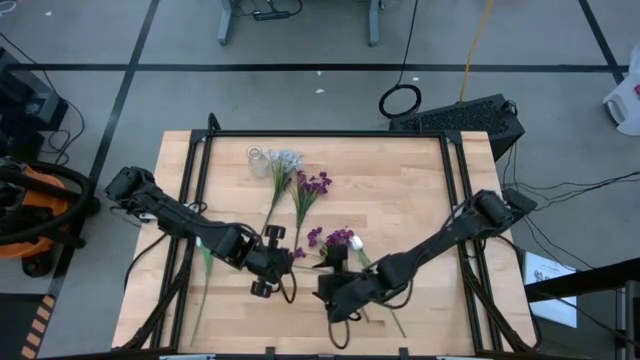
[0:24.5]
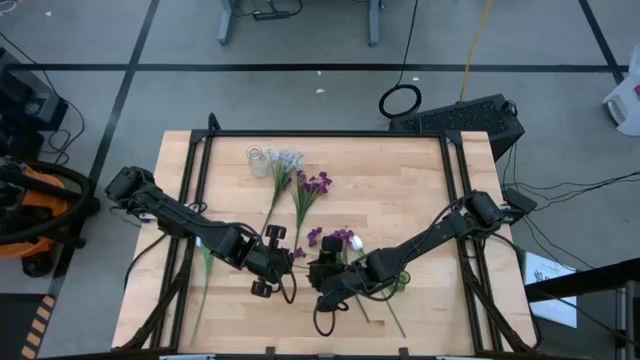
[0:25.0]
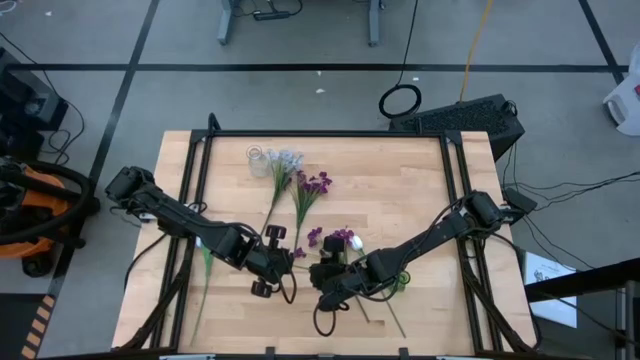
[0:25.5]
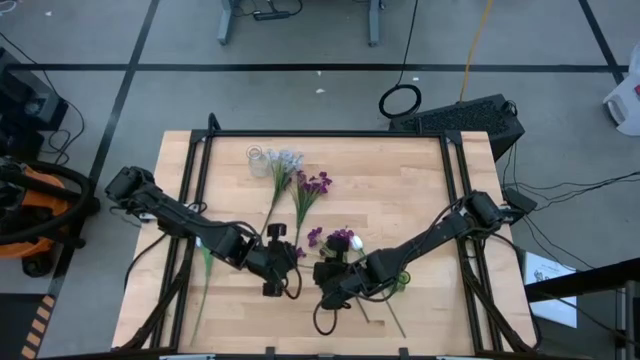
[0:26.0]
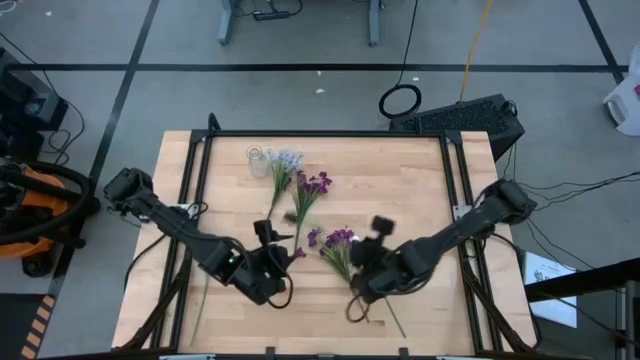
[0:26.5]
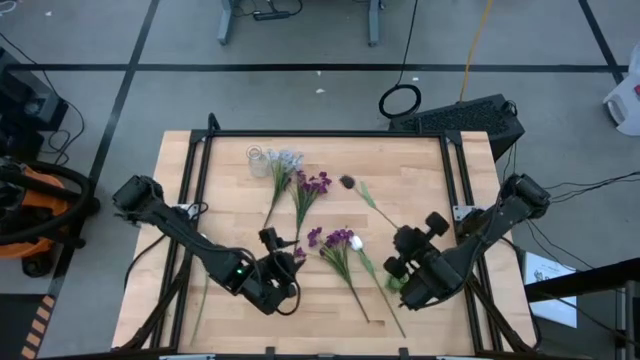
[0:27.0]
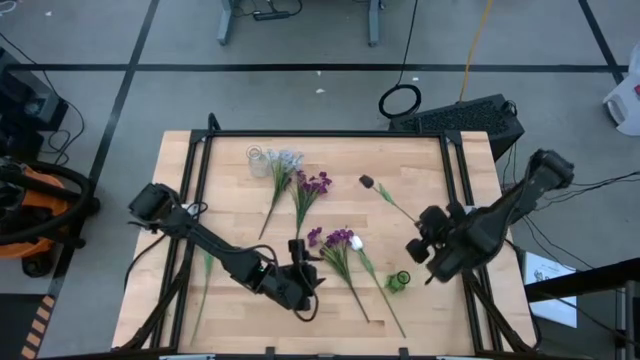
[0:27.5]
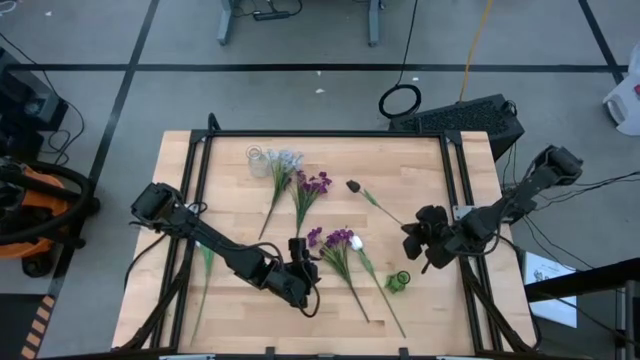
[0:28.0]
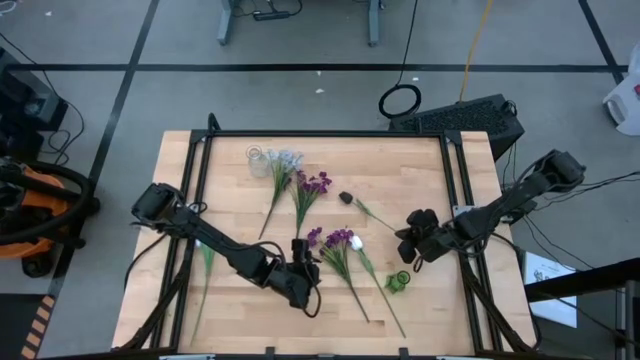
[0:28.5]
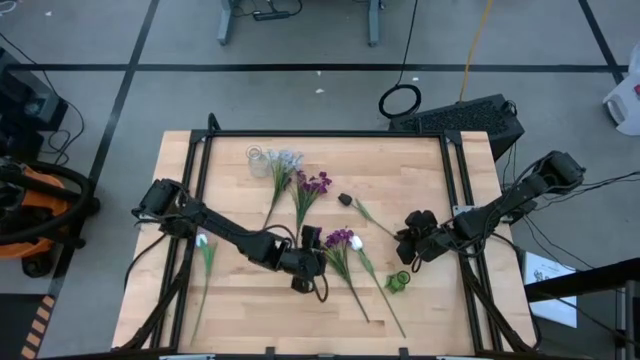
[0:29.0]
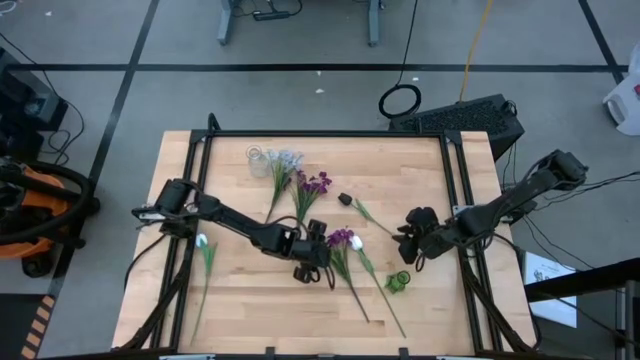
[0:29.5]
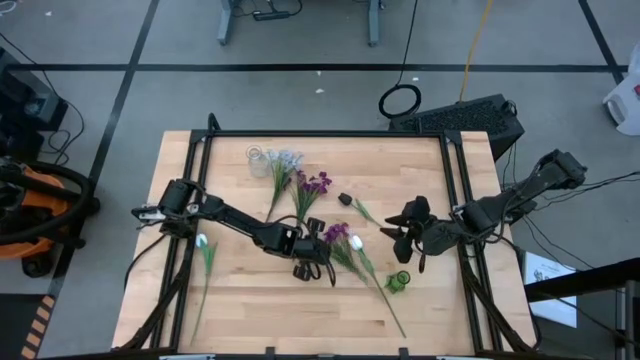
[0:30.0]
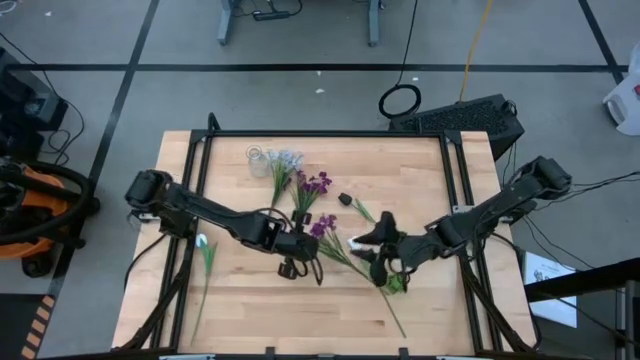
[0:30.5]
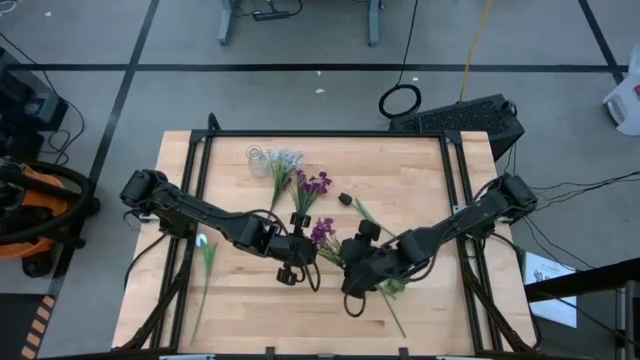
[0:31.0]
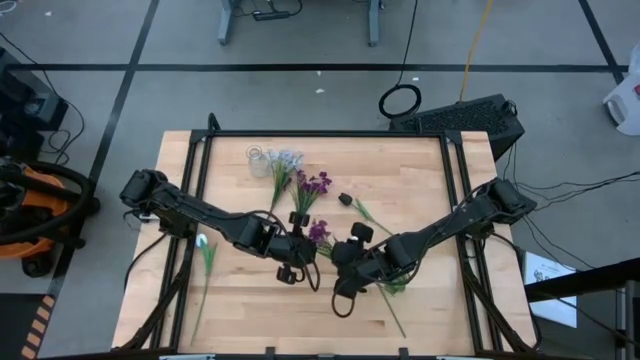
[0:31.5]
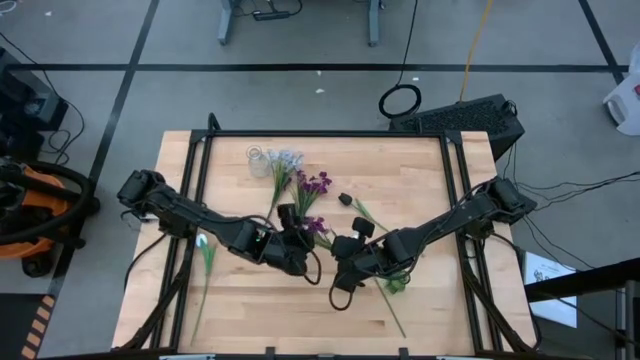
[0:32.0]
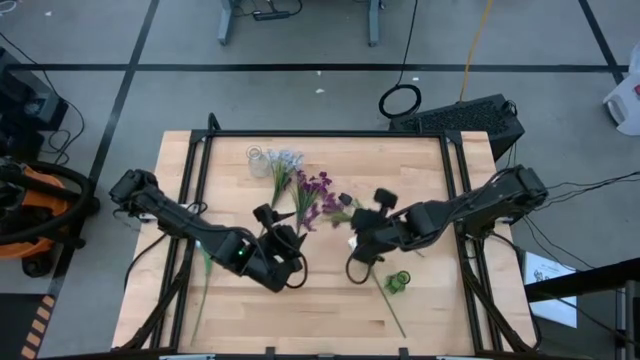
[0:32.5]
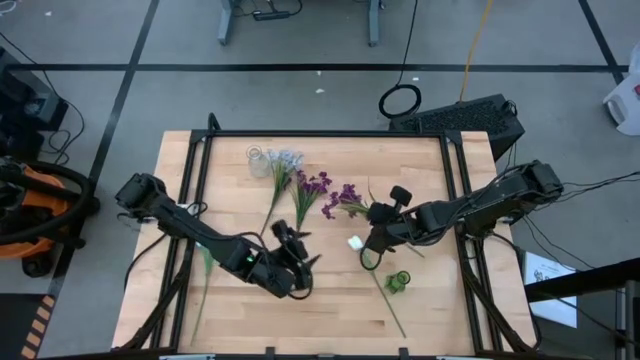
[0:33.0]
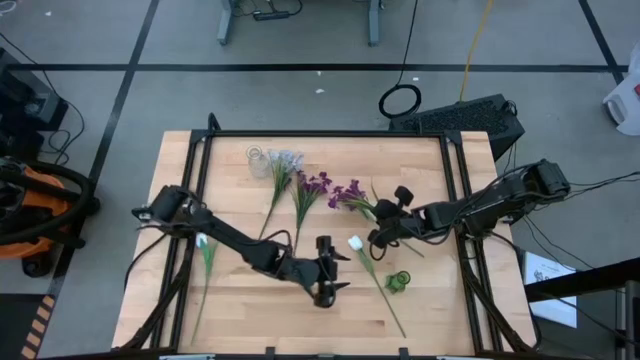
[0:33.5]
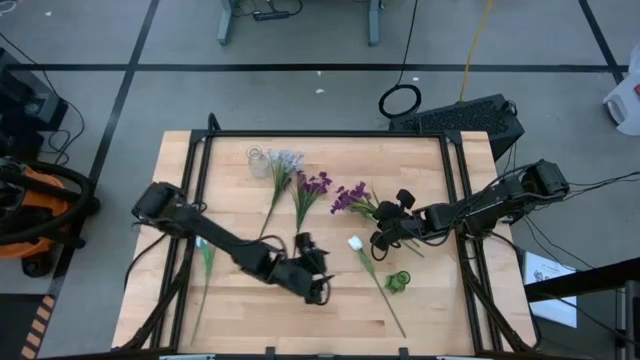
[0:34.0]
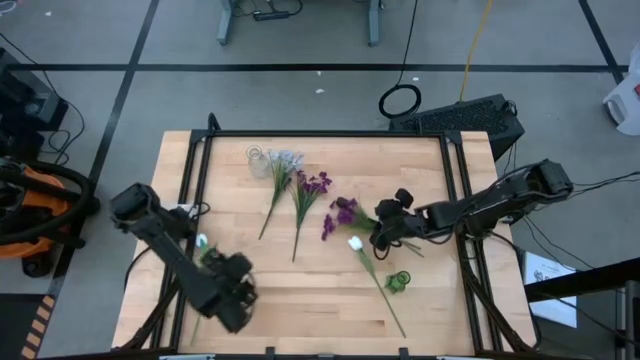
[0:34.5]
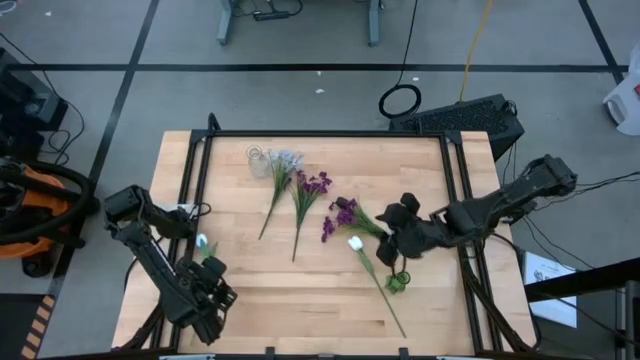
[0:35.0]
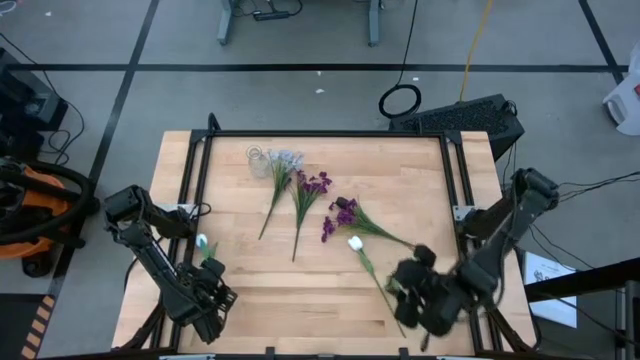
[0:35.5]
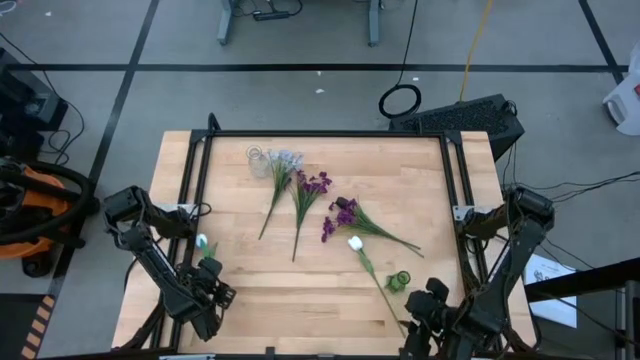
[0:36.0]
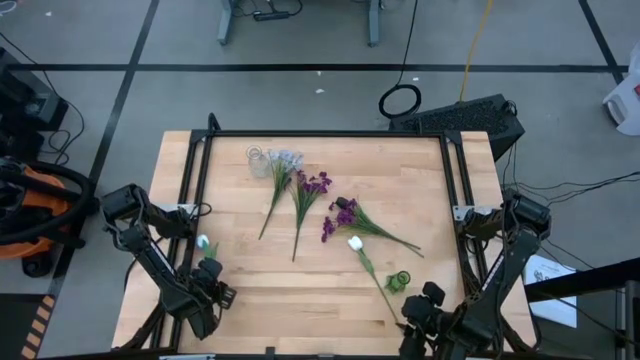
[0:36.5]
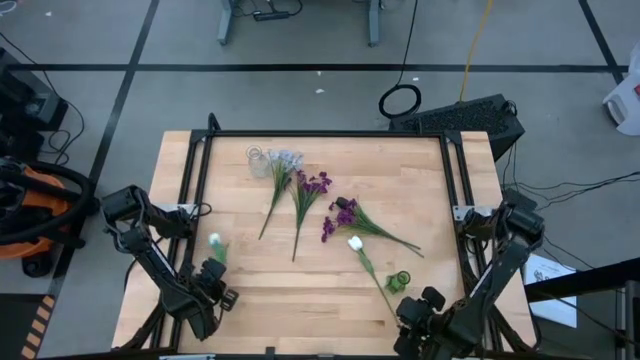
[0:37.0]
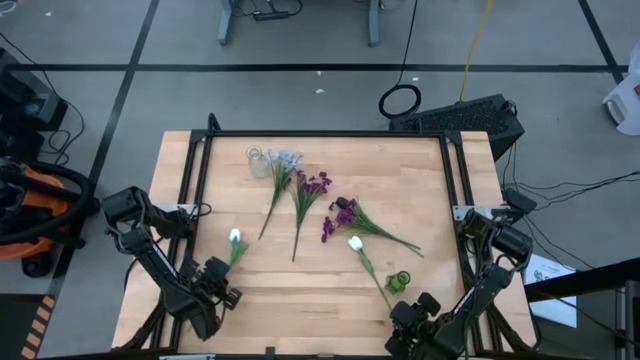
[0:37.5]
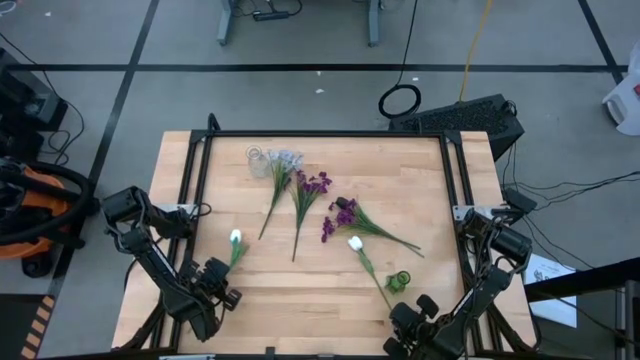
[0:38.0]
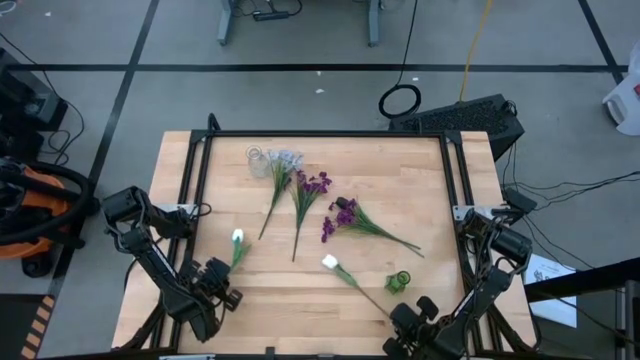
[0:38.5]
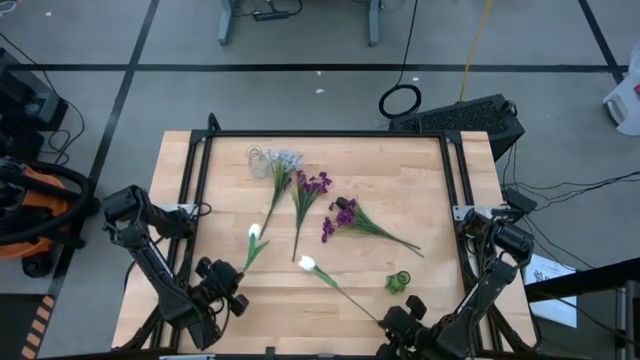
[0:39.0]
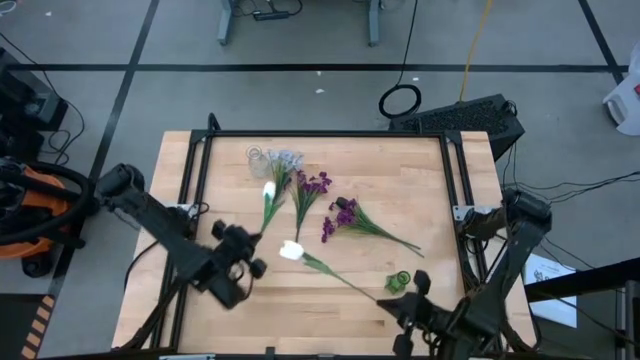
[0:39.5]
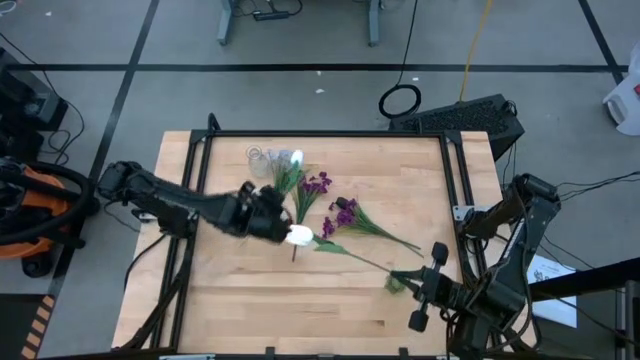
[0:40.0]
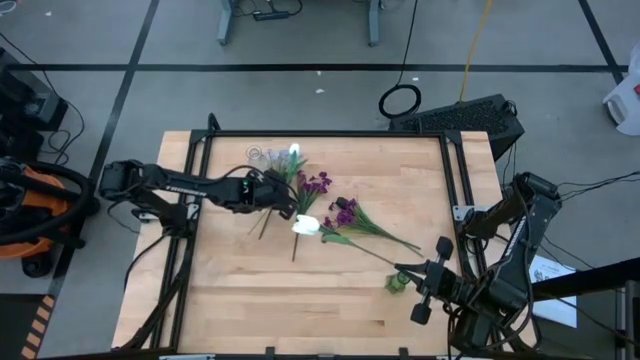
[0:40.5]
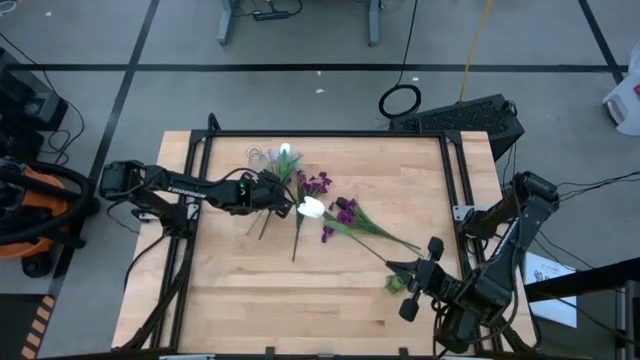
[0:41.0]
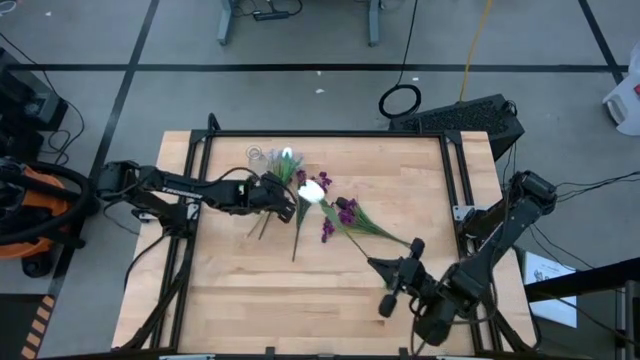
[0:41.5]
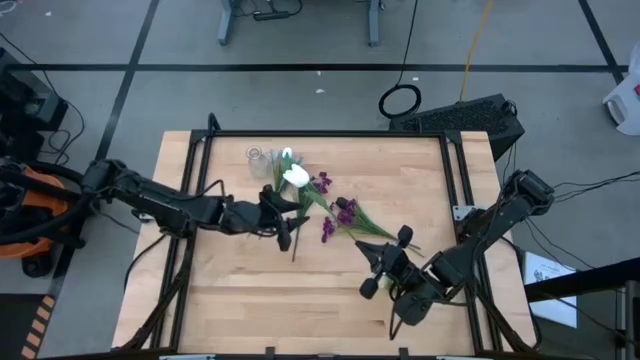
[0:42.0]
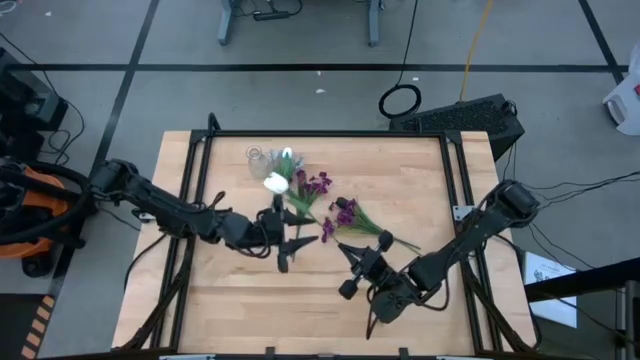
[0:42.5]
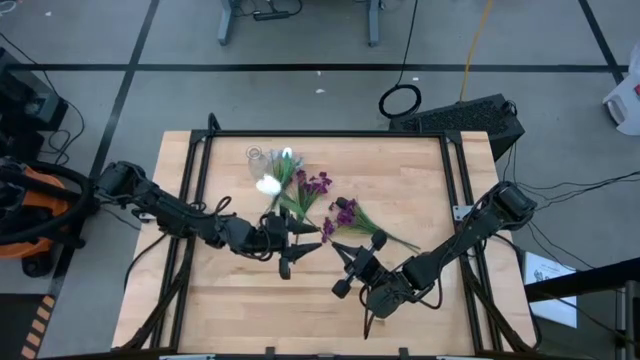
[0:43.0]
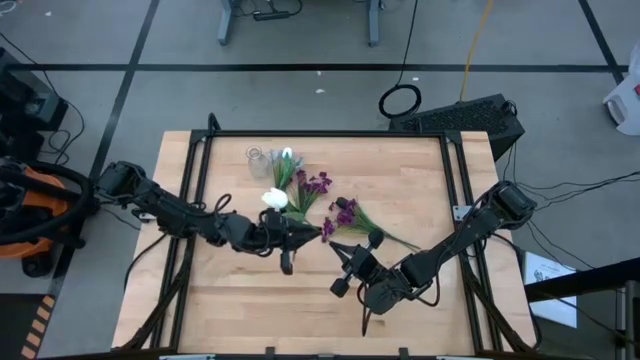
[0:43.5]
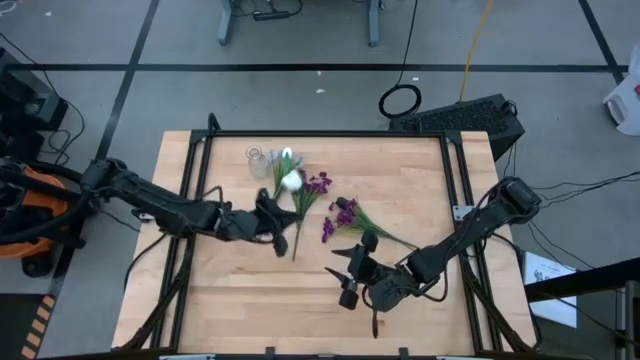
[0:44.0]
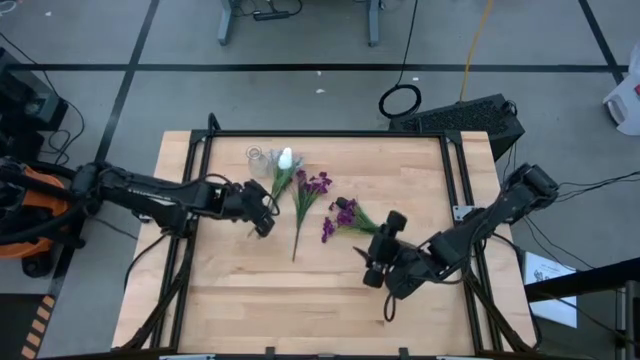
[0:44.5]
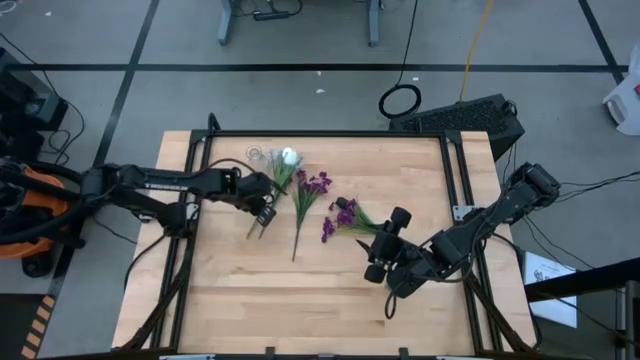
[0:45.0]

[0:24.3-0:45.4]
Task: Sort flowers into vase by color
Prepare the flowers
